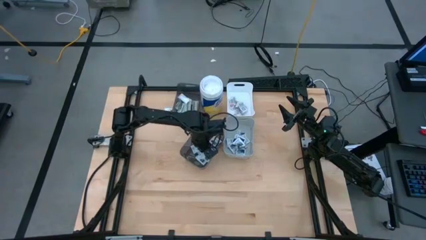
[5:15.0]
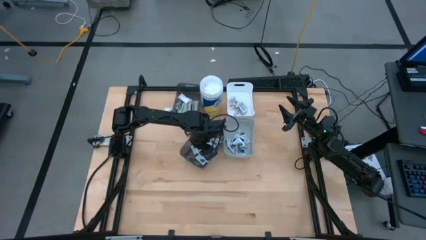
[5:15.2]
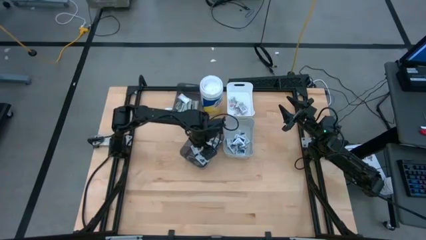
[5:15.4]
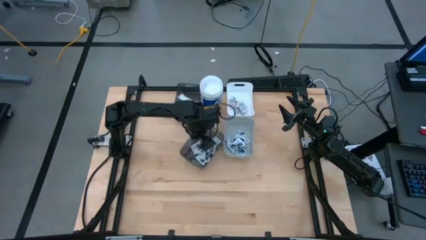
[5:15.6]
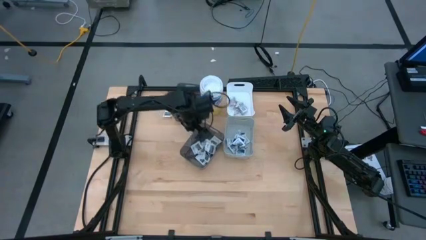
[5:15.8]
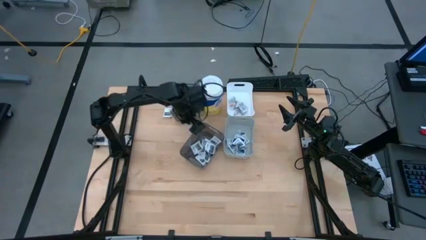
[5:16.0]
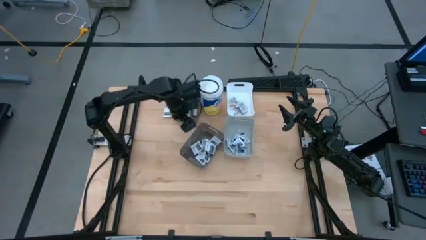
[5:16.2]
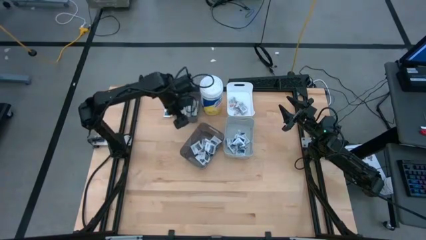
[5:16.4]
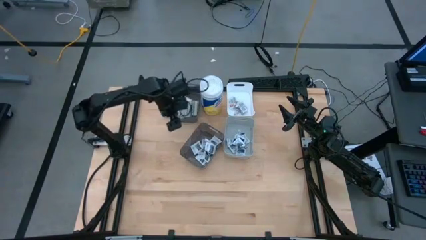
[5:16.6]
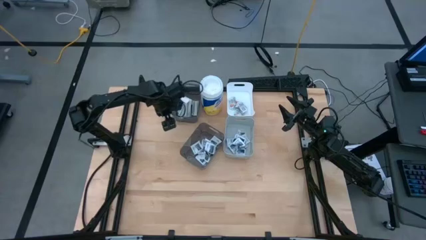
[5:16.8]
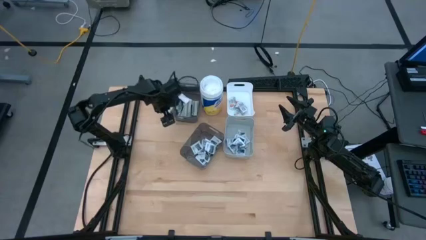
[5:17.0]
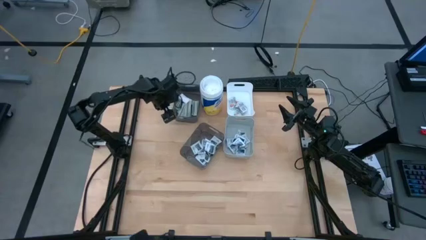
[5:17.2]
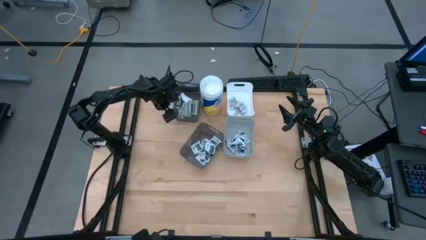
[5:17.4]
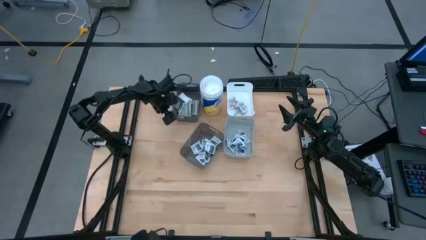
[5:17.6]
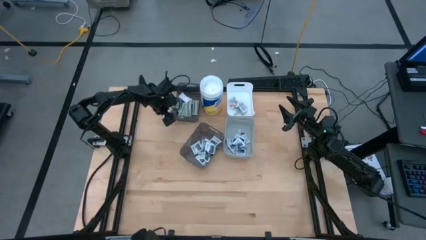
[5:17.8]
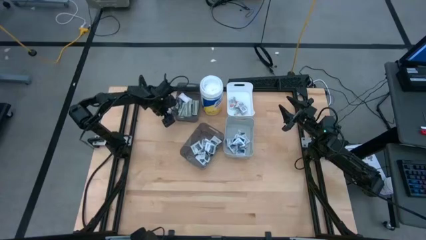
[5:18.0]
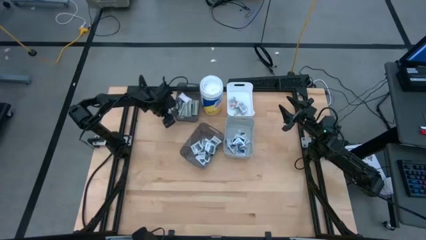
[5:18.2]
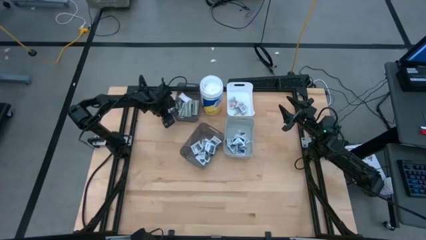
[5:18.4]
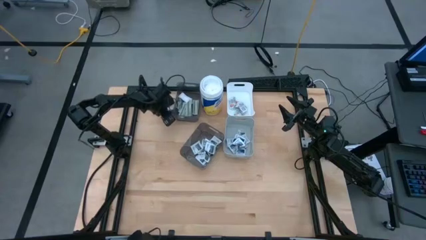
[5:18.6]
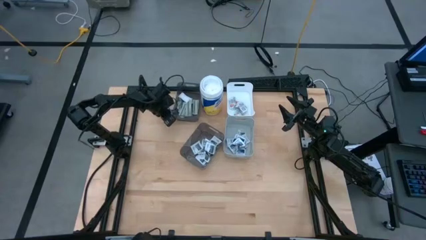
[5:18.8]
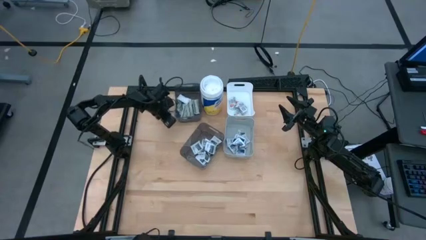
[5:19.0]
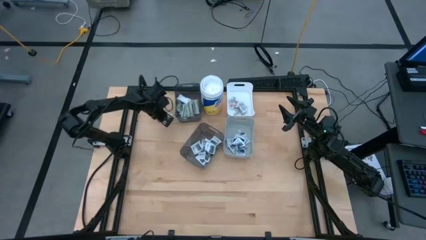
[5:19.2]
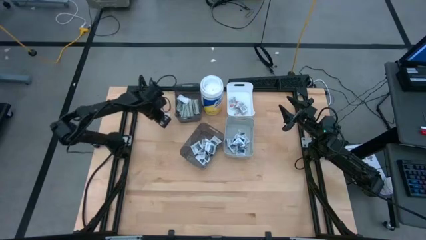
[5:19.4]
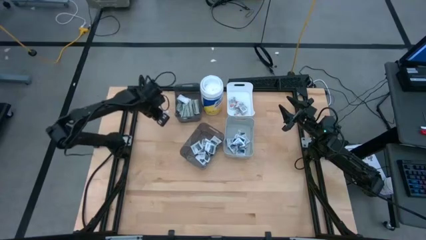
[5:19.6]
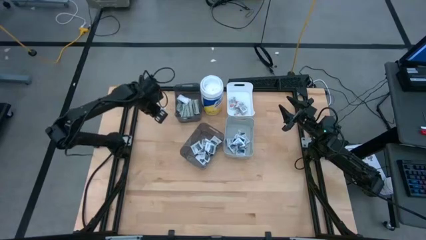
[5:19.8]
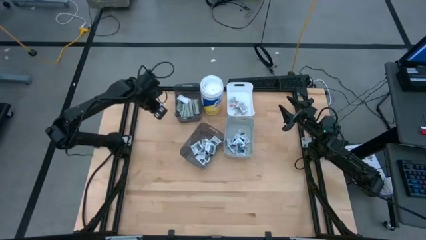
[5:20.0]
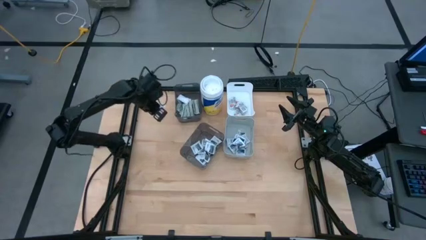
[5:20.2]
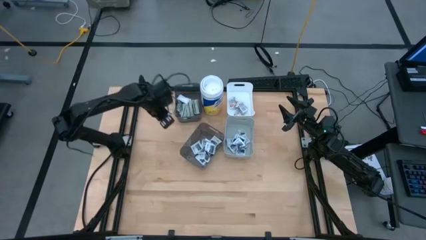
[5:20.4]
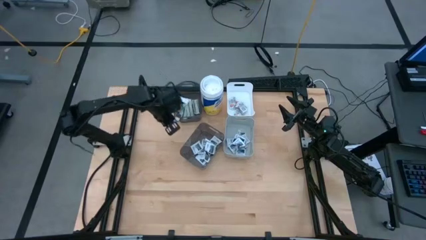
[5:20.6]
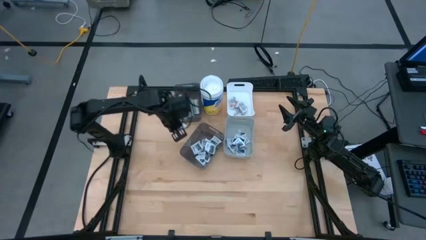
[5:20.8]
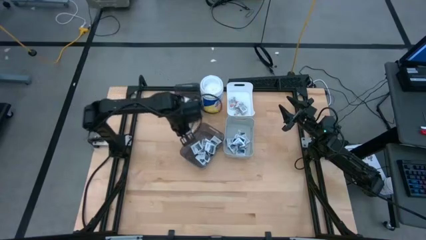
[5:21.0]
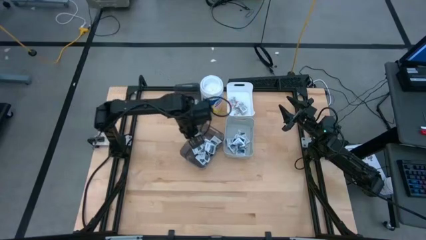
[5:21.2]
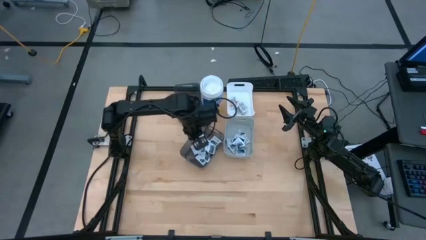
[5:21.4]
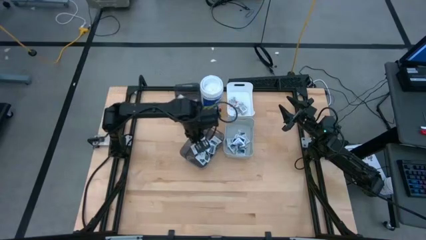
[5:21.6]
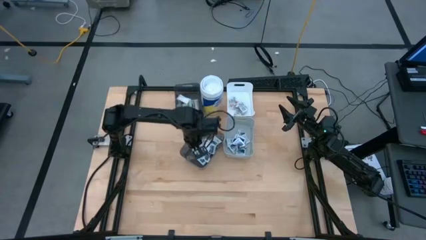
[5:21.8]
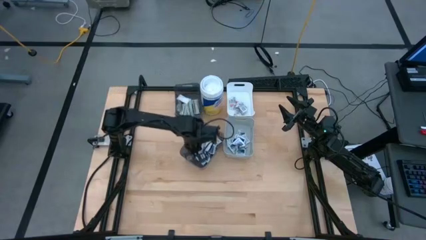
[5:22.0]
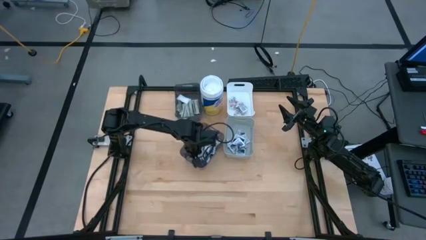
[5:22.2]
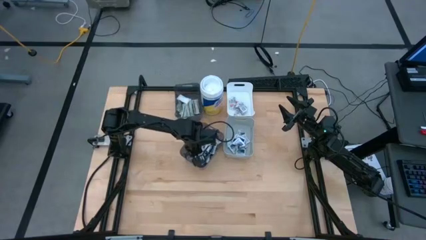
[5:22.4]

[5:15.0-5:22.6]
Task: Pick & Place First Aid Supplies
Put the towelette pack into the bottom black bin

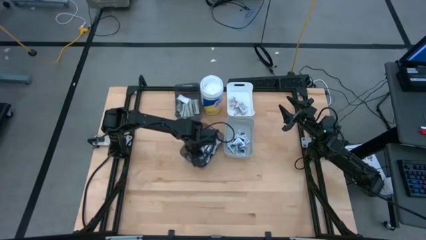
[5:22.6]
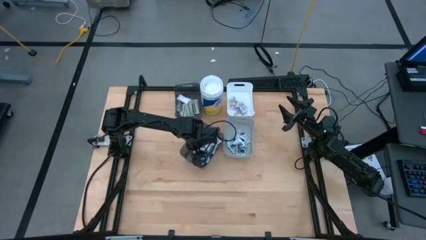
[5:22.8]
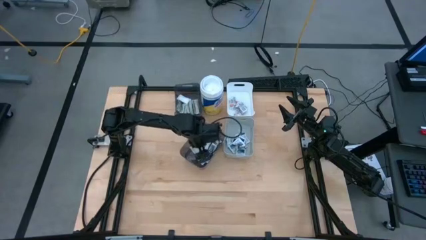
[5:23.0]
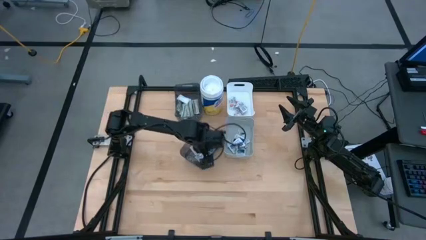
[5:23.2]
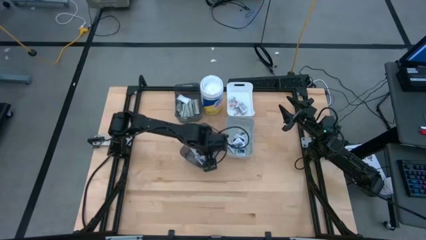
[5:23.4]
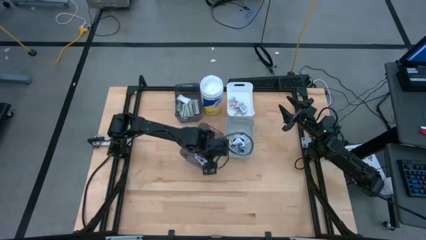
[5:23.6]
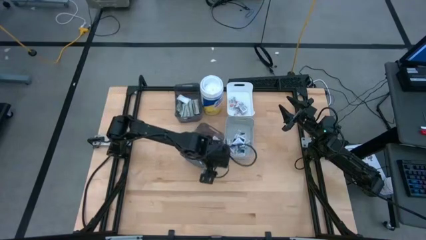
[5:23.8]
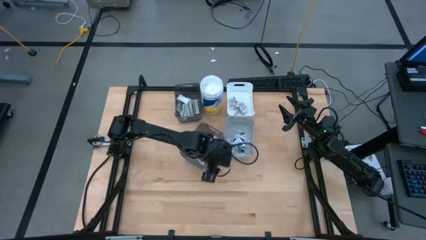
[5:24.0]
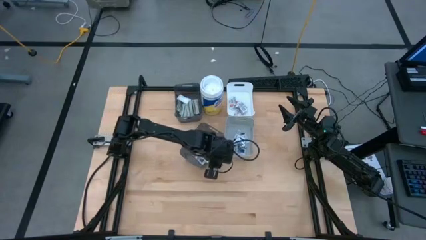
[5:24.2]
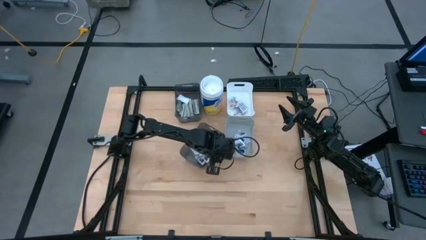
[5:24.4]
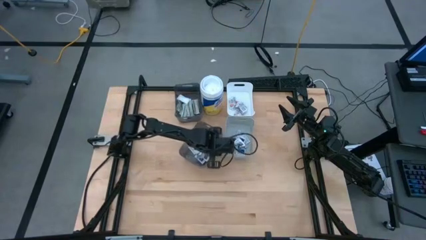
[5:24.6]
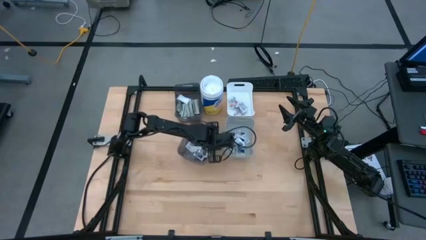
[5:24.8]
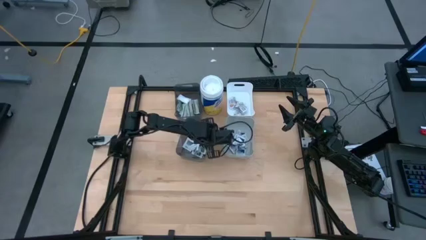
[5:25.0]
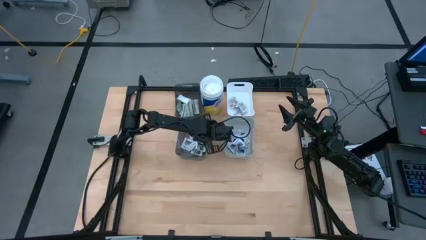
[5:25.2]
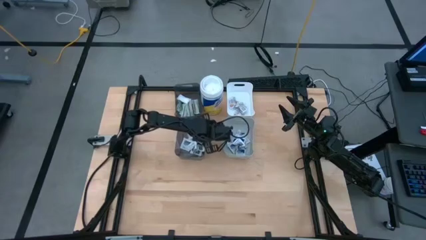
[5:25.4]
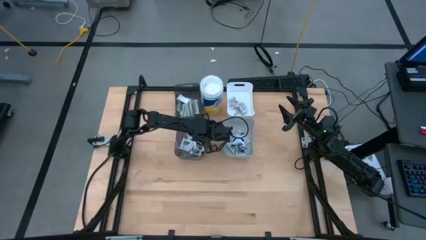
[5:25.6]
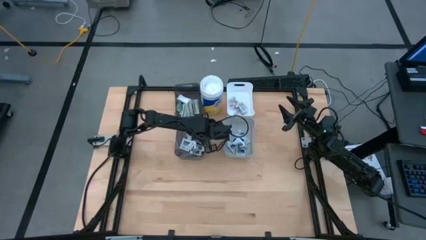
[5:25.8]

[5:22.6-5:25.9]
Adjust the bottom black bin on the table

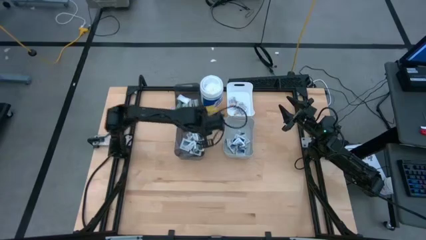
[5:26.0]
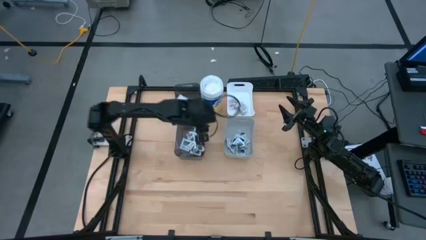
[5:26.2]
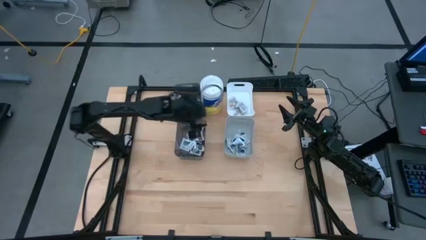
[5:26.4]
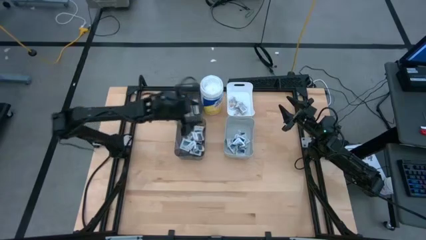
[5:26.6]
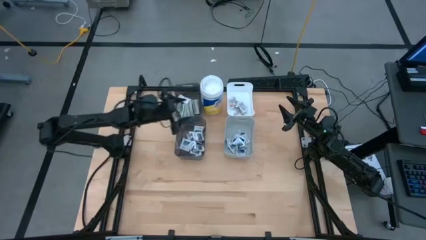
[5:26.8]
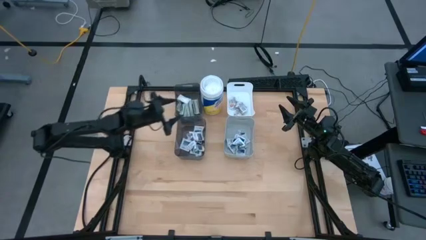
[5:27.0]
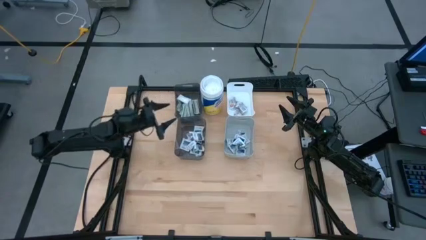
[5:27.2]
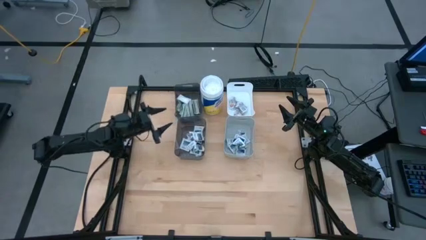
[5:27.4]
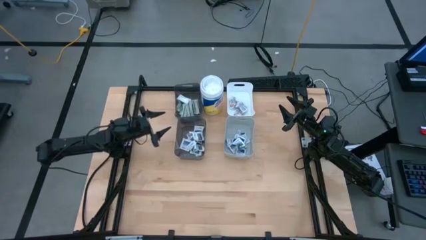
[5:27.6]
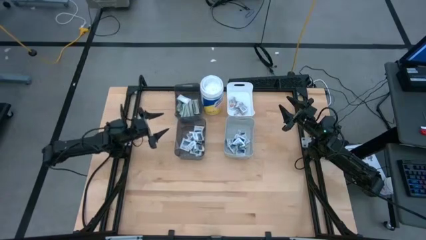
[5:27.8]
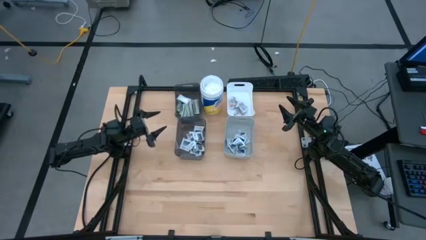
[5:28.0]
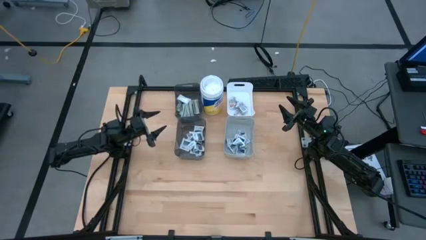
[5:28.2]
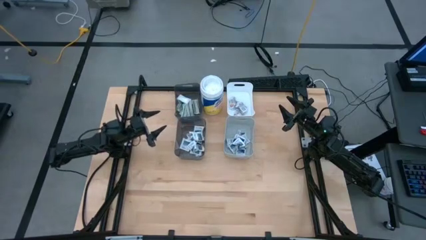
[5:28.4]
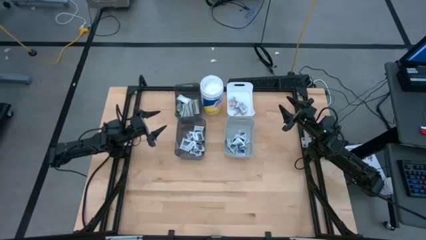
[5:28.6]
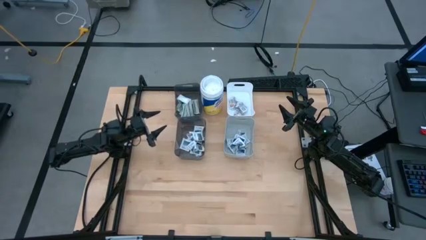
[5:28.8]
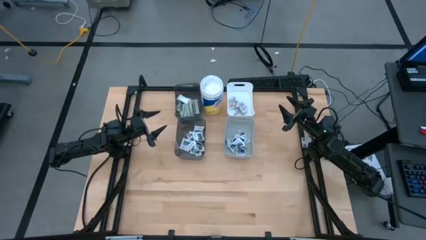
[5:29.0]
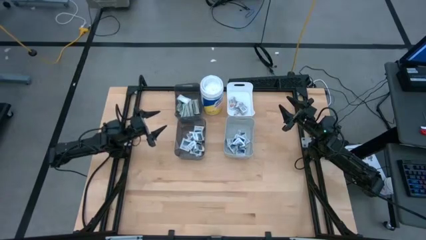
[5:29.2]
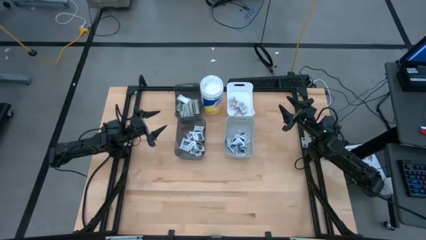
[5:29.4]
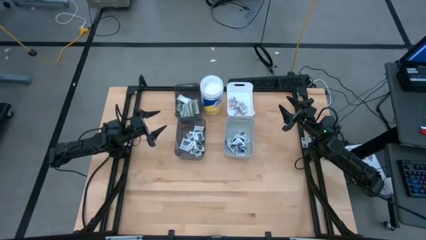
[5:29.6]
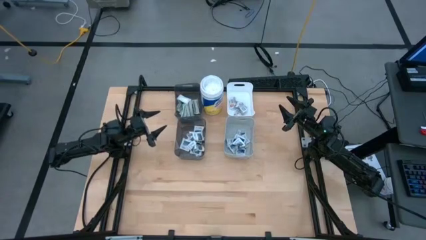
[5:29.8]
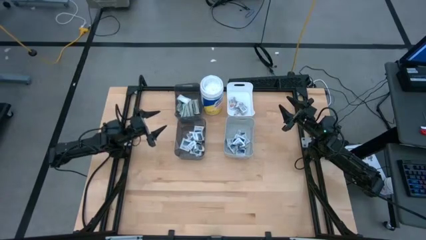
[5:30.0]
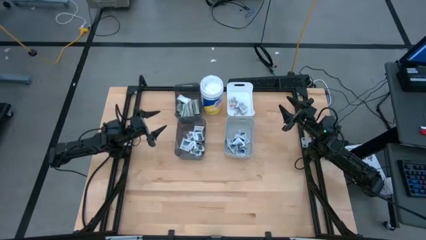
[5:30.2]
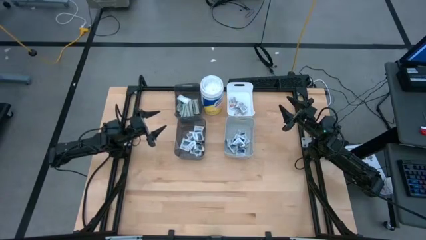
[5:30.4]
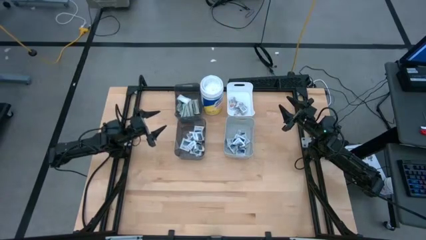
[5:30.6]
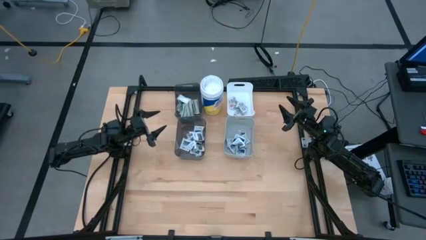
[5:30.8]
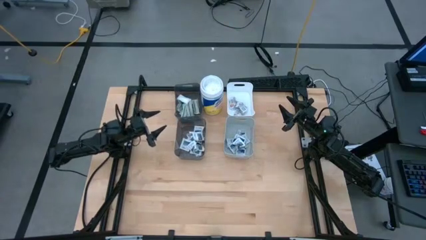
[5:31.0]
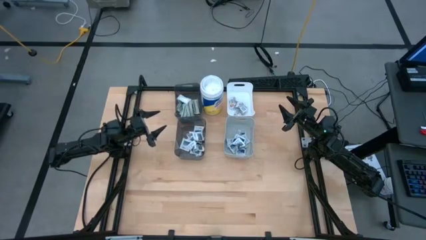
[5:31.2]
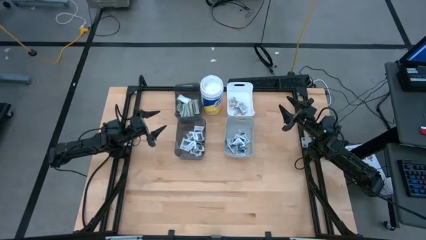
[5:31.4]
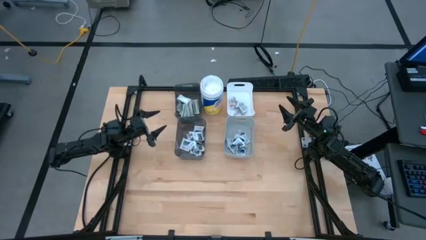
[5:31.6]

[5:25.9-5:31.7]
Return to Home Position
